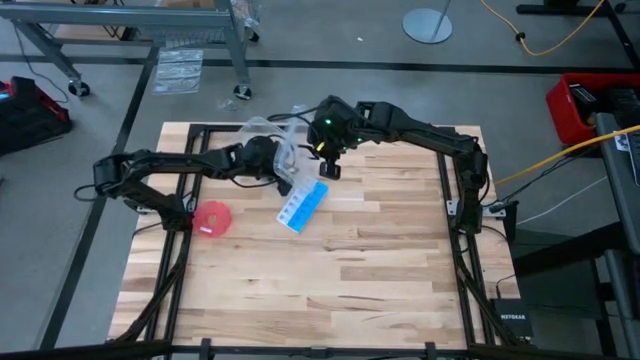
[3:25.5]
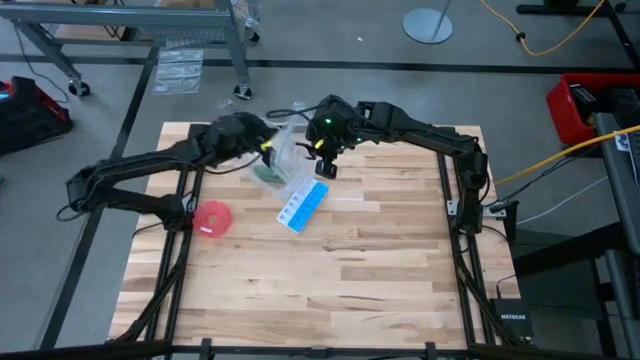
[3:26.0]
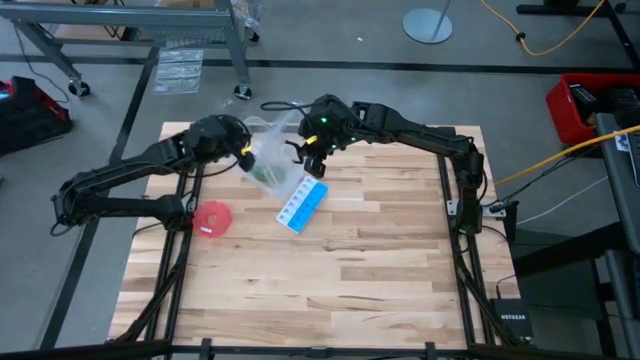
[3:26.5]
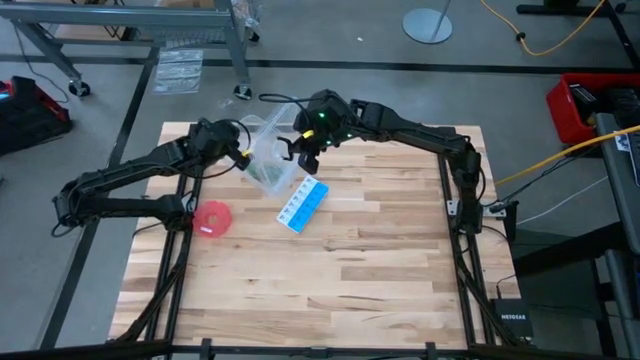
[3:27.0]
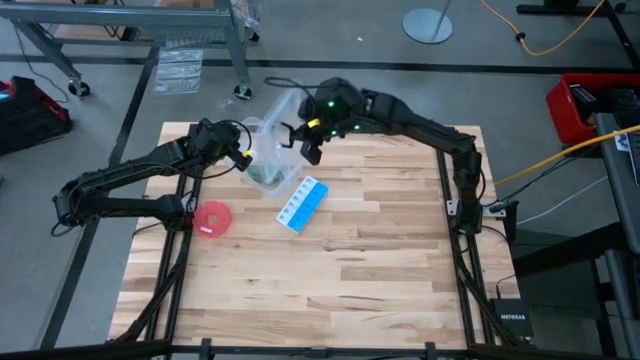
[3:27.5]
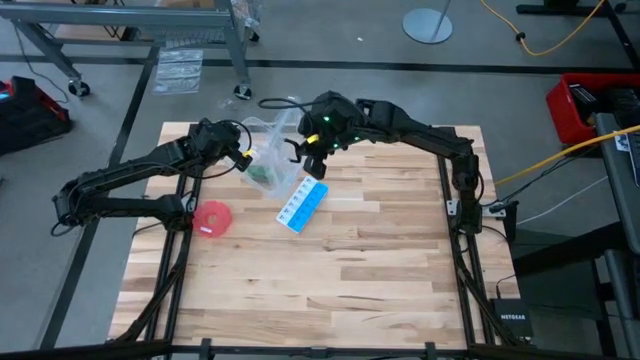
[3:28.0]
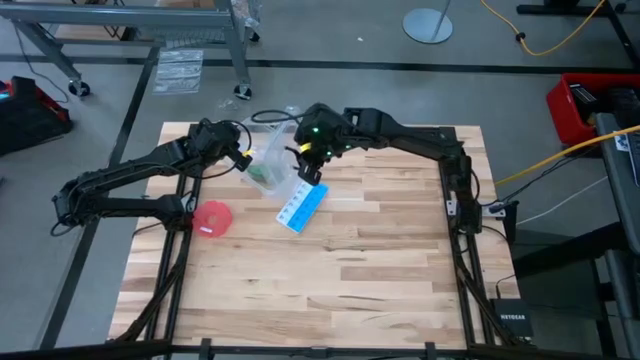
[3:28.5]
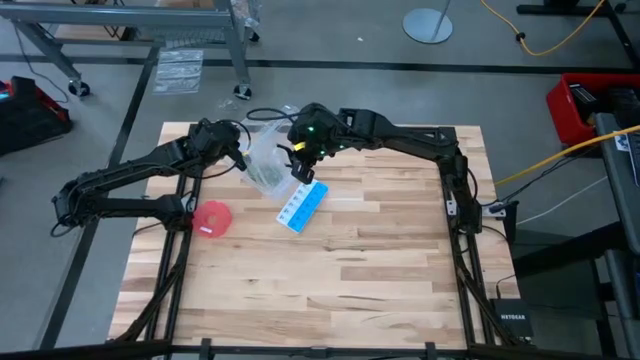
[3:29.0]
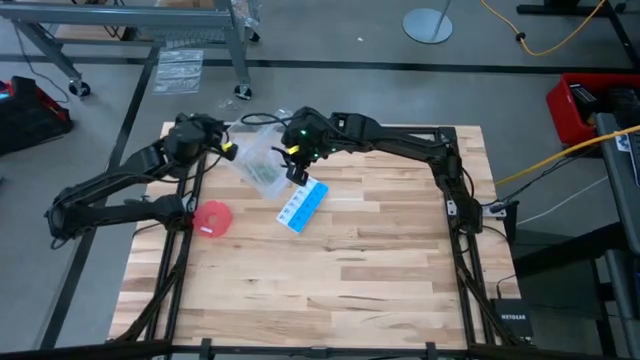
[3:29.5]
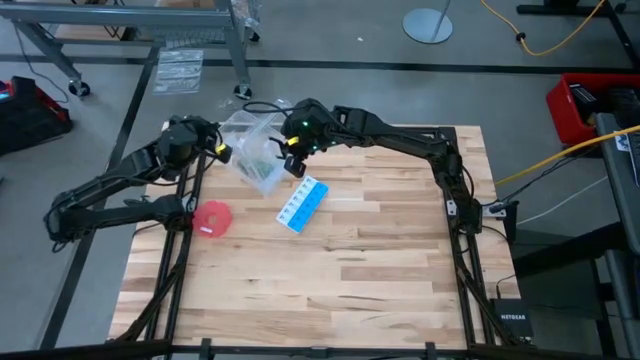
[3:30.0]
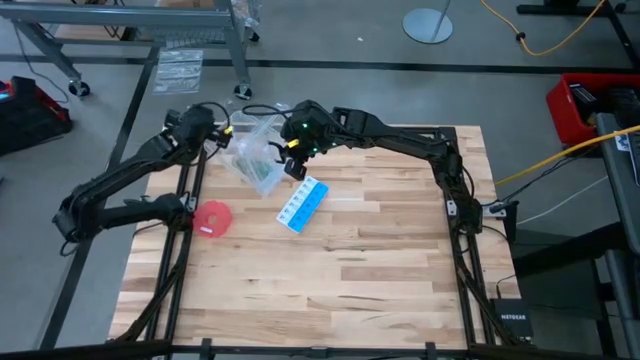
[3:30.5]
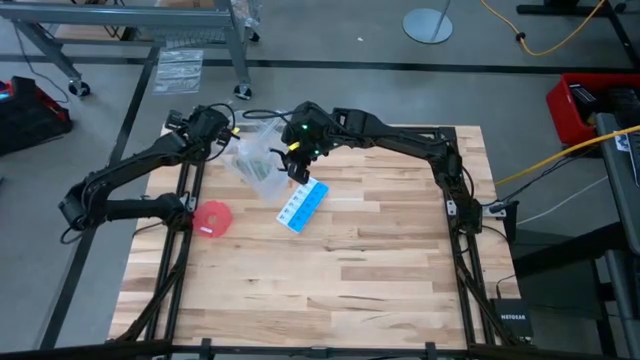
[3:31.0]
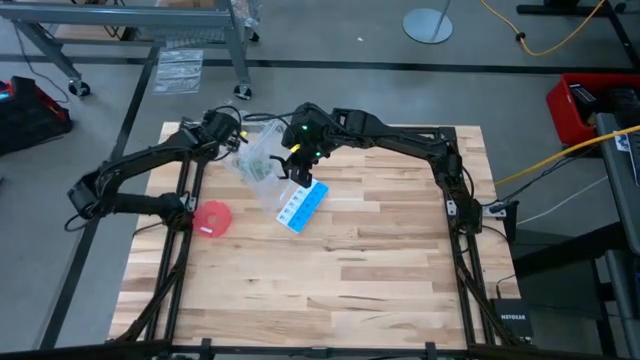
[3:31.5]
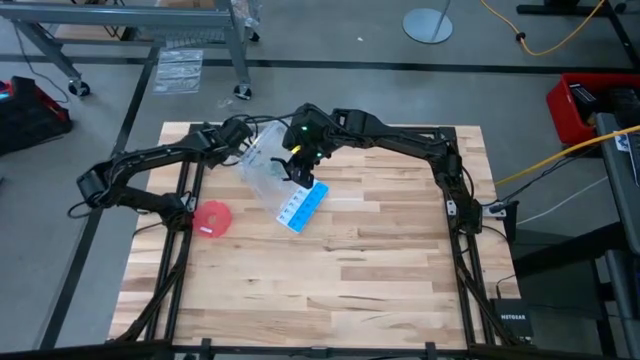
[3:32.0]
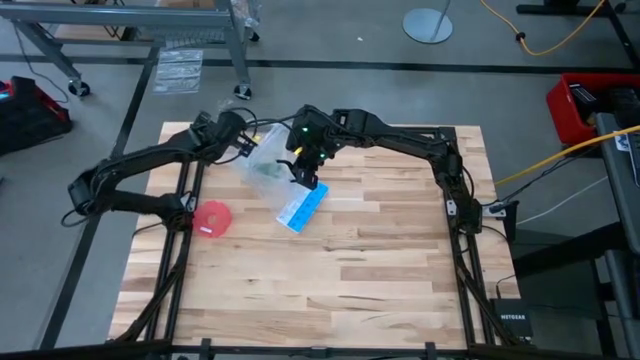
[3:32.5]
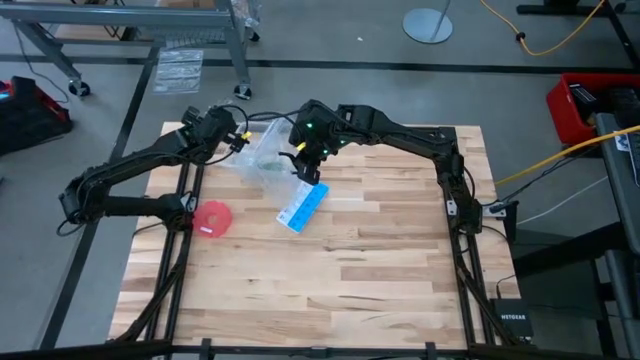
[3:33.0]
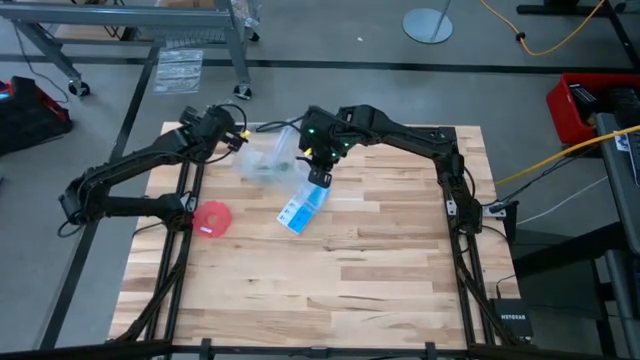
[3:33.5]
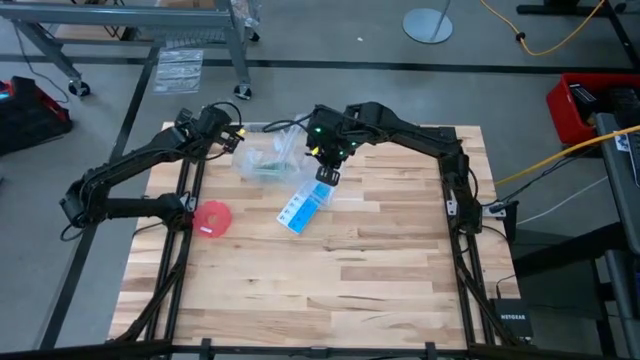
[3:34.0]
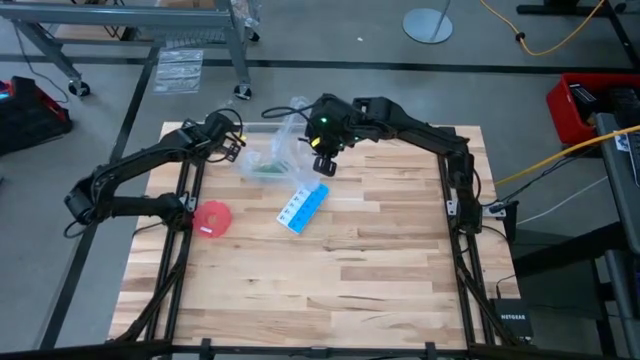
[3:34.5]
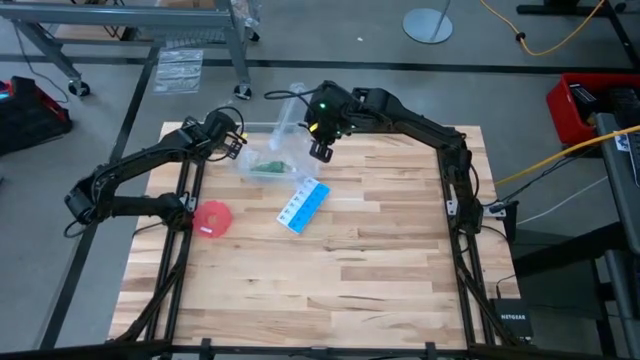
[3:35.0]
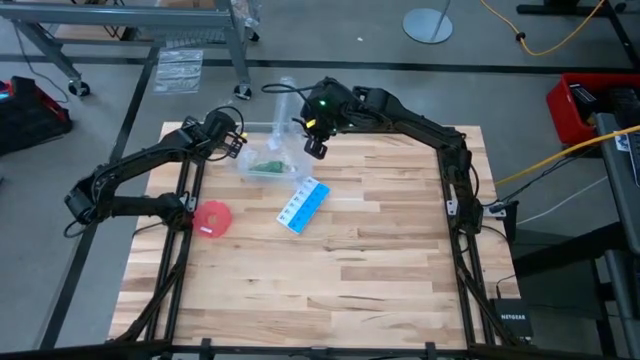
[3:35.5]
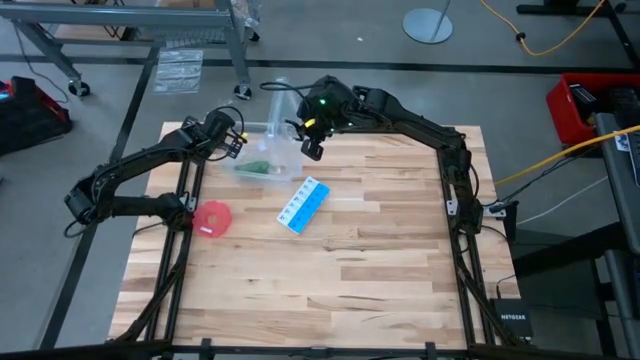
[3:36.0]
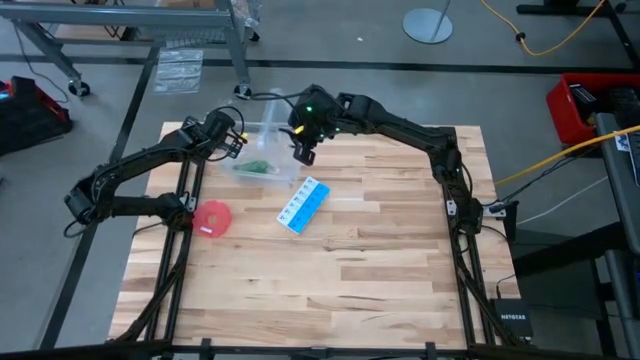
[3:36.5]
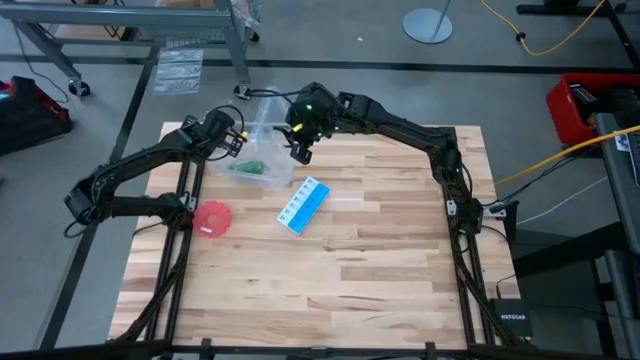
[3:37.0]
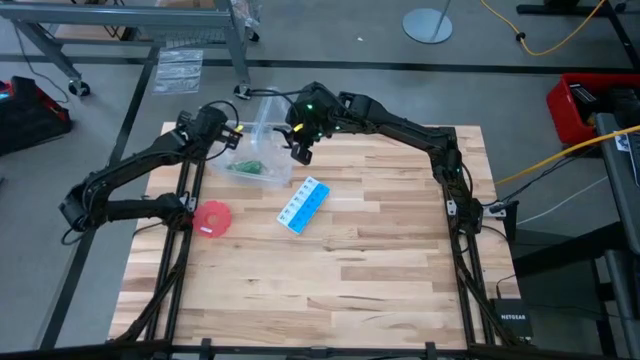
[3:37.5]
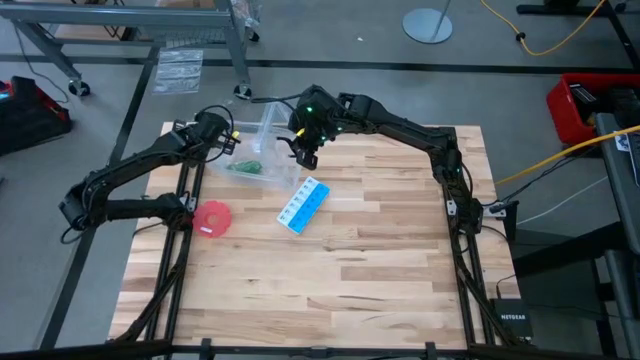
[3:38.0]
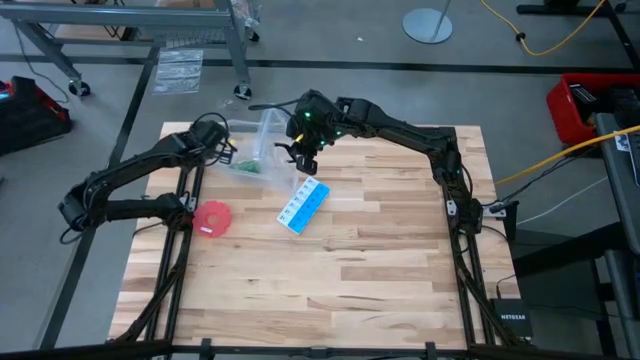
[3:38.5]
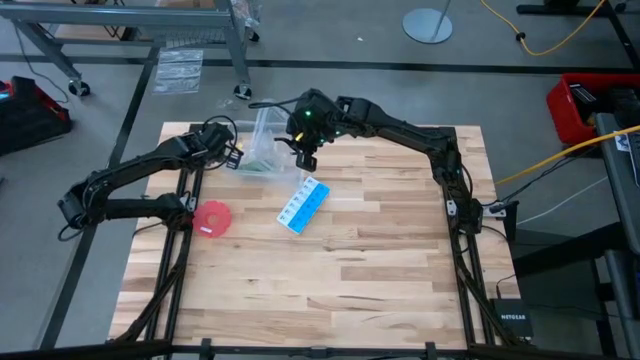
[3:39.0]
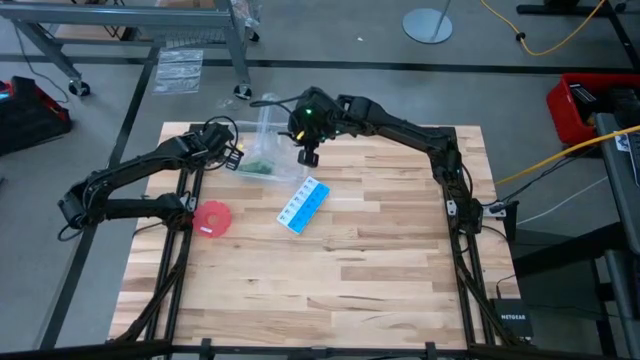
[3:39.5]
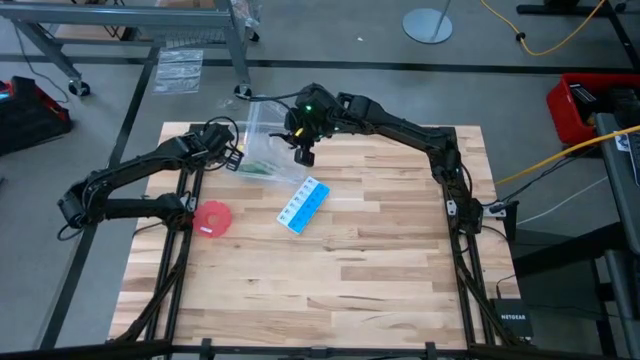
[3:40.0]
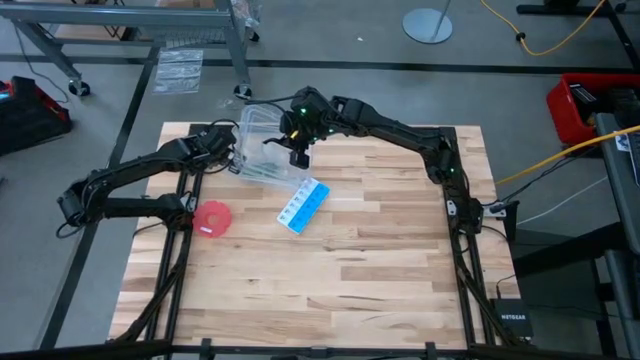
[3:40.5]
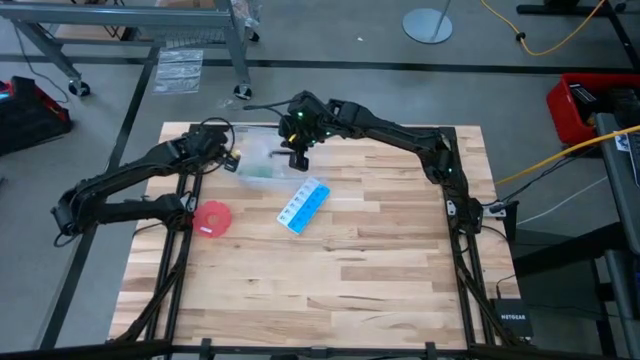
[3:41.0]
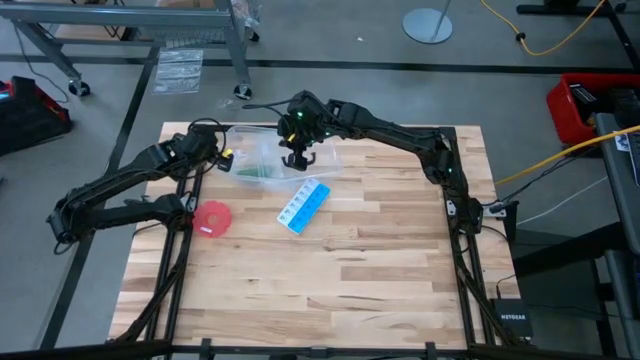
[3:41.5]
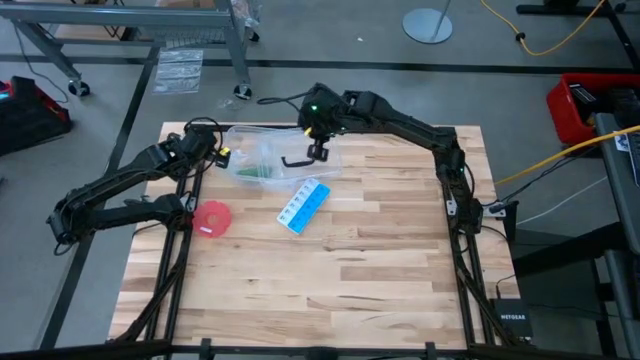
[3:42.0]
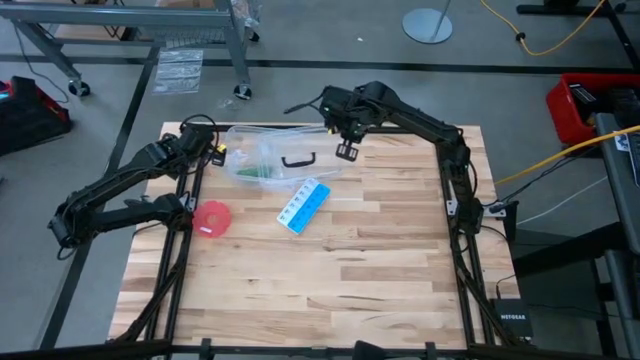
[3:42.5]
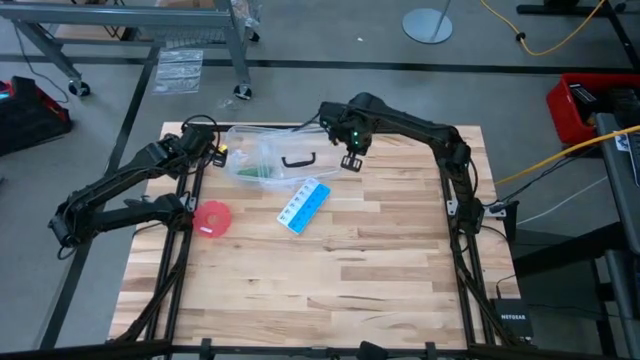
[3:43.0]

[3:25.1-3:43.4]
Task: Roll bandage
Close the transparent container

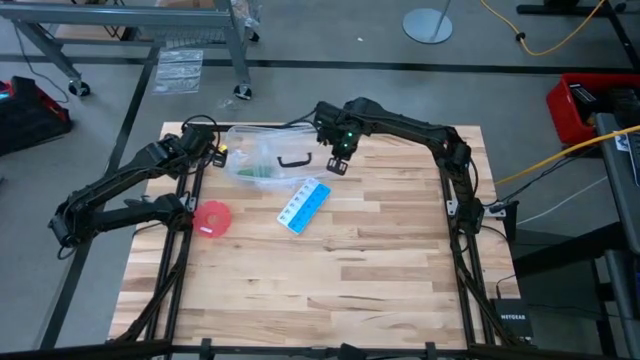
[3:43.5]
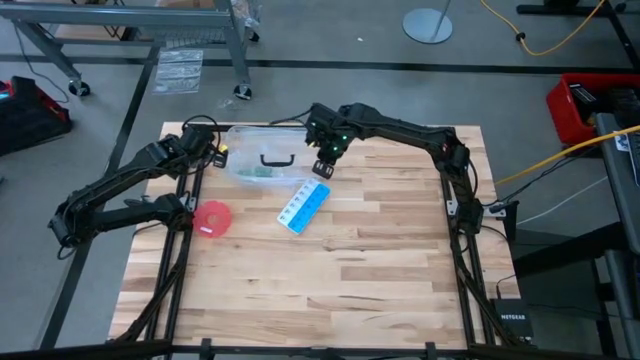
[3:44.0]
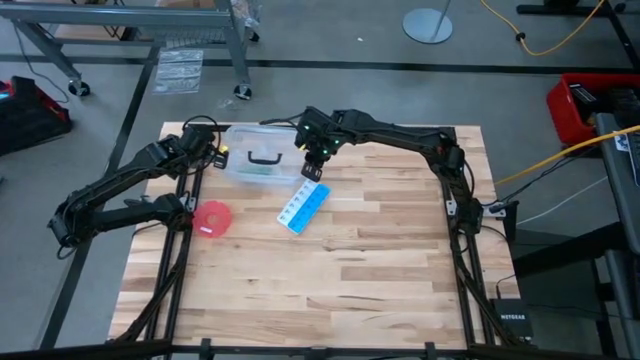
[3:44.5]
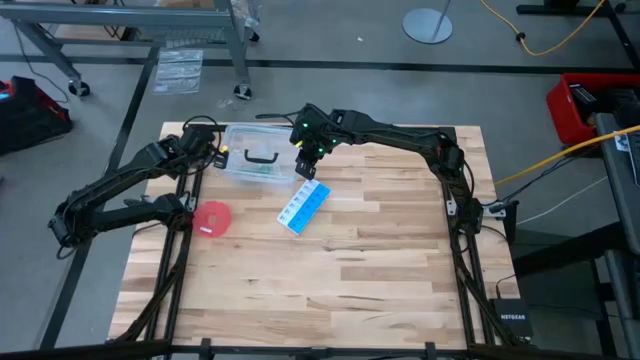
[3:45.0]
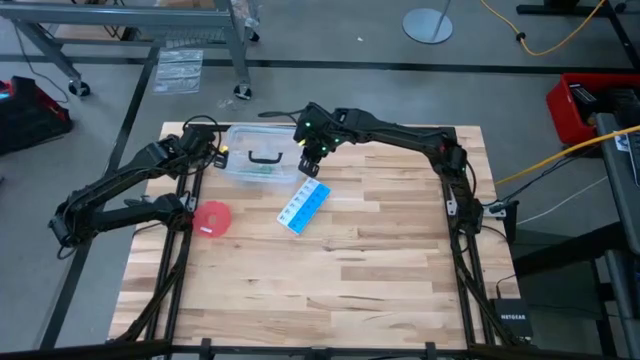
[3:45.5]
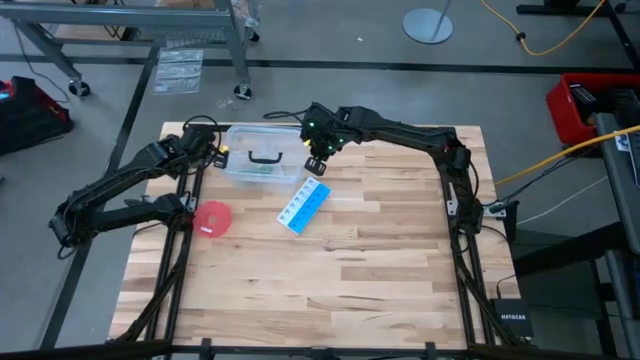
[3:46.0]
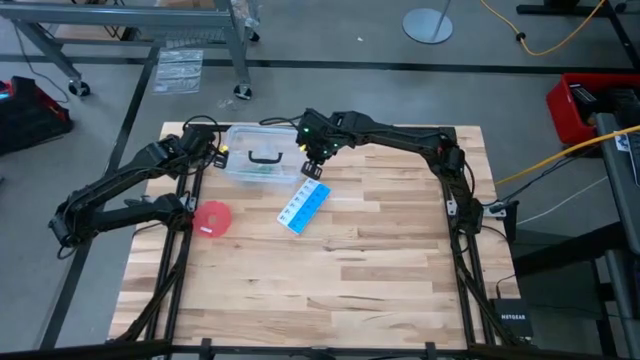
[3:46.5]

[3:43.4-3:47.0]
Close the transparent container

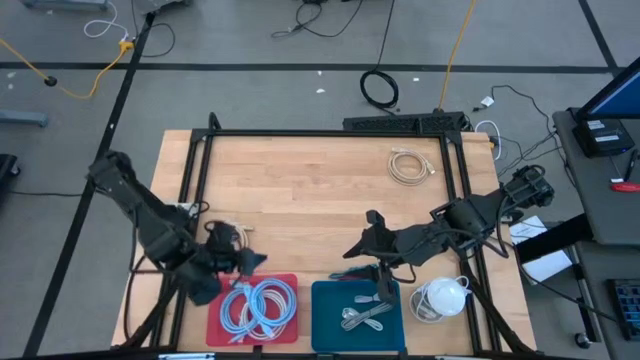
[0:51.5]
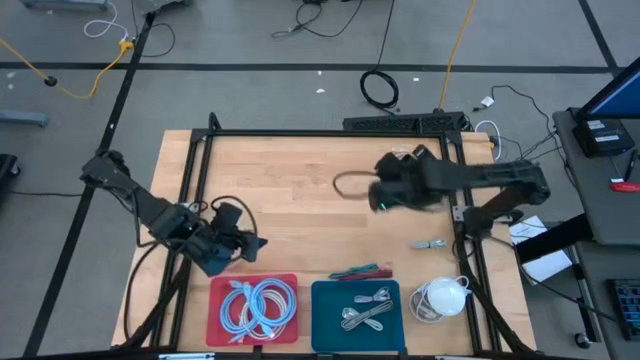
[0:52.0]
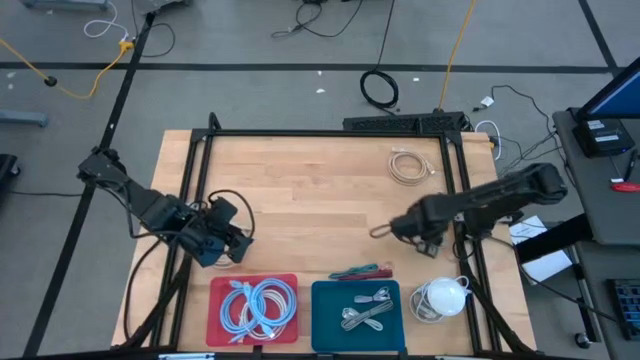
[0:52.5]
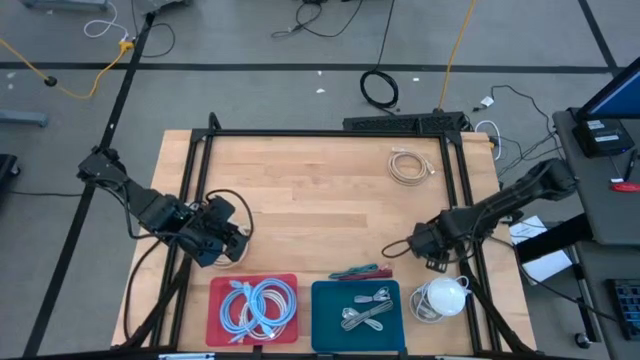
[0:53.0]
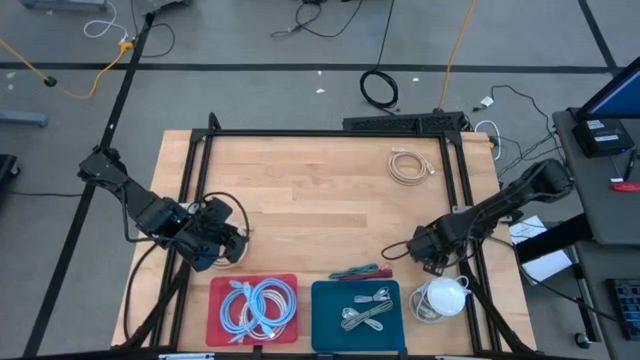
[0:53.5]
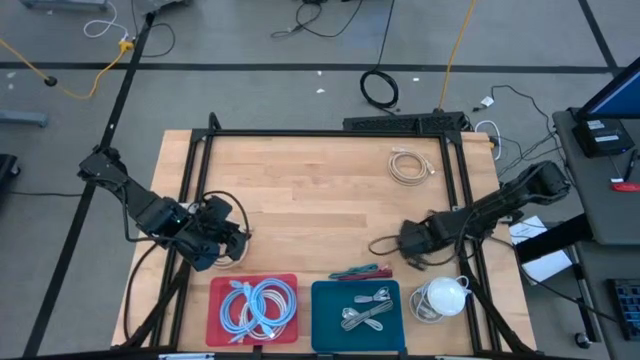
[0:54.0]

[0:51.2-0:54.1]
Task: Pick & Place USB Port
Put the white USB cable into the blue bin
